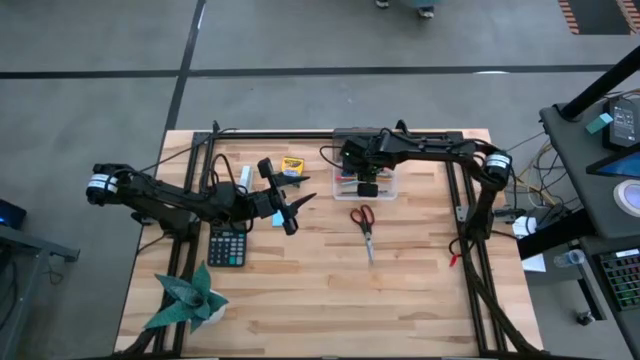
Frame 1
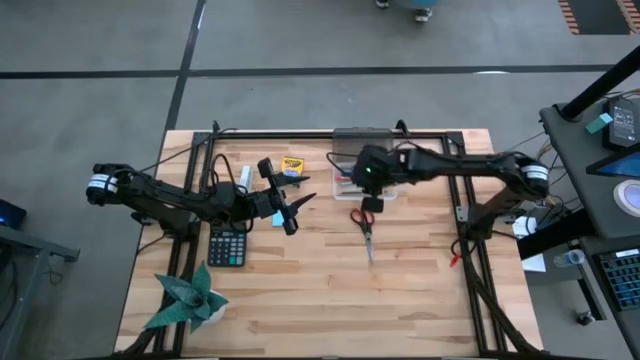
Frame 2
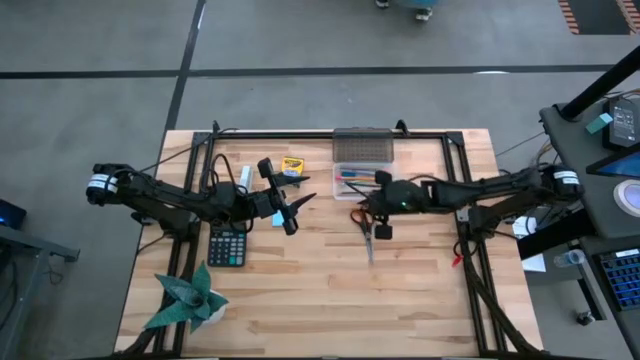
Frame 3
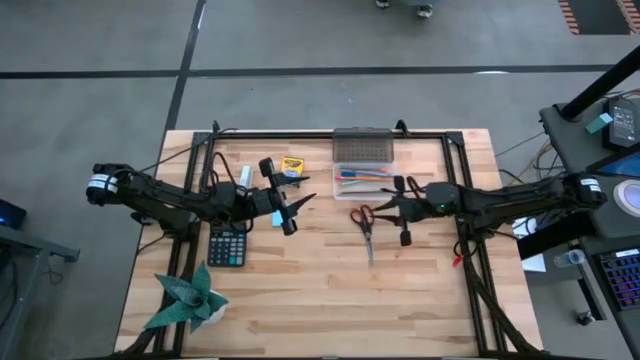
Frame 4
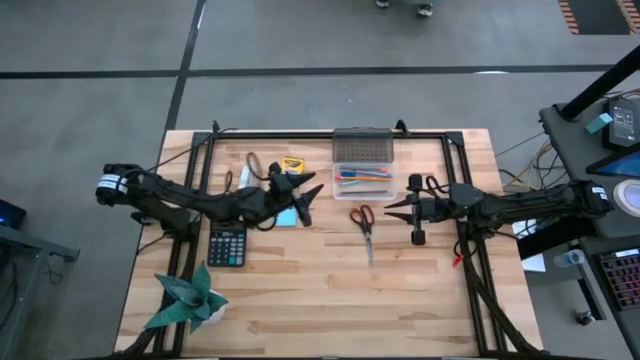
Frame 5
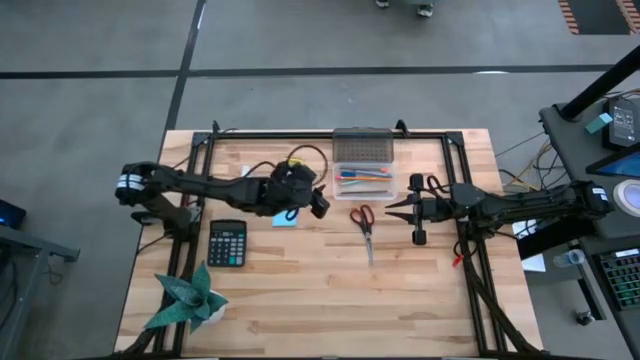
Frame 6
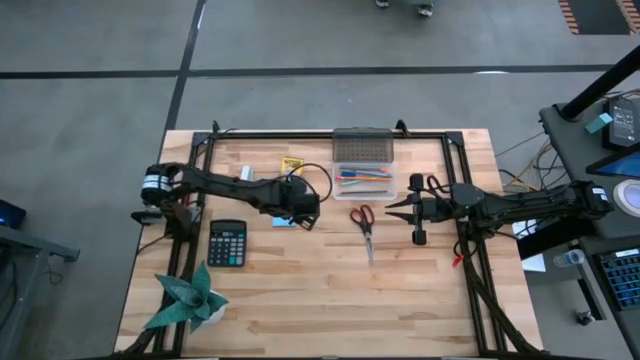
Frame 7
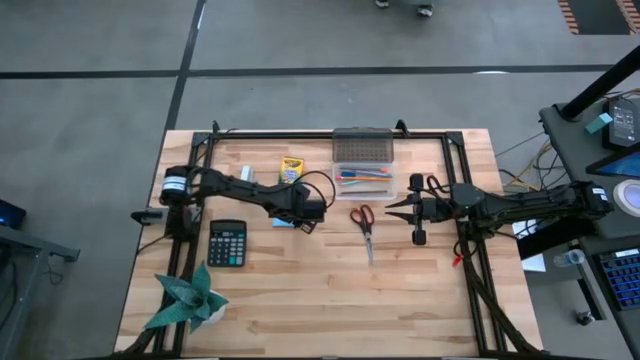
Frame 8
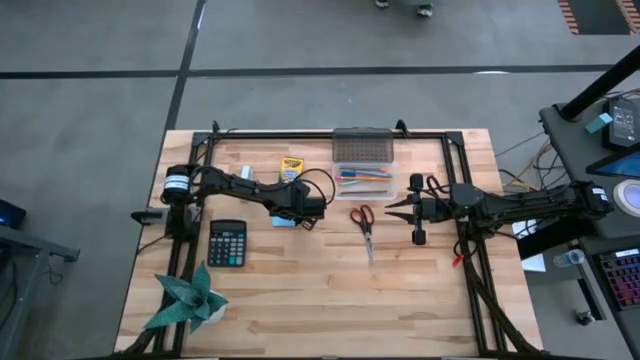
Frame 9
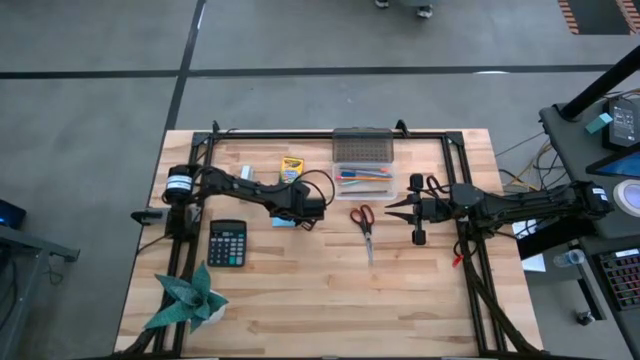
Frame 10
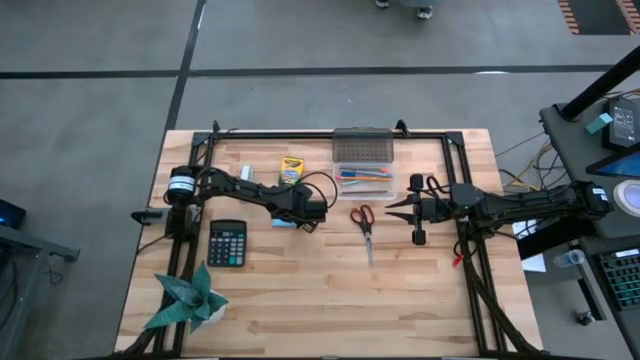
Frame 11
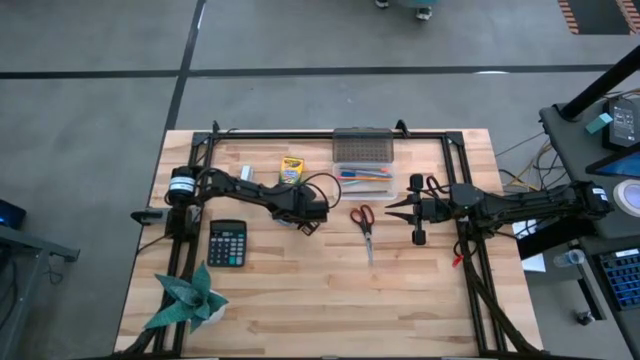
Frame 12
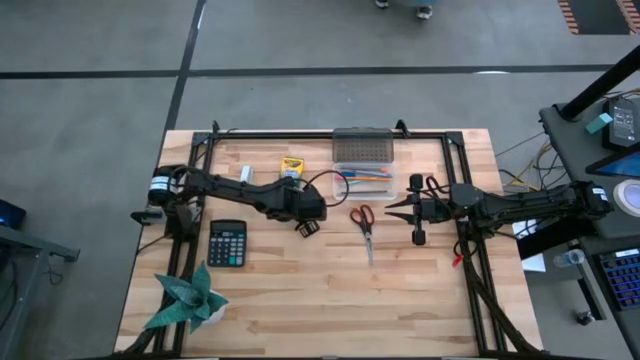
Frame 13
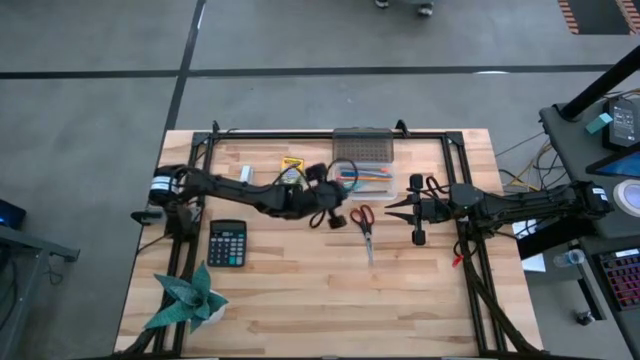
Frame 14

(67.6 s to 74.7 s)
Task: Pack school essentials
Put the blue sticky notes into the transparent supply box

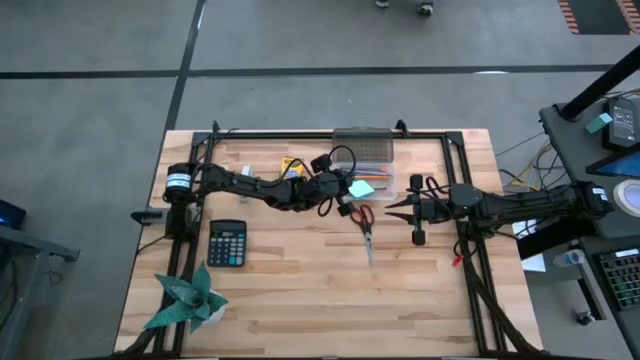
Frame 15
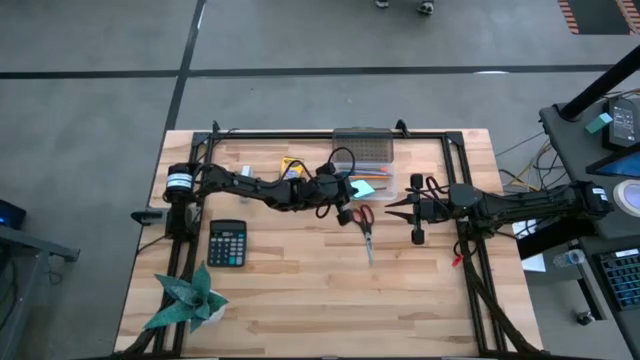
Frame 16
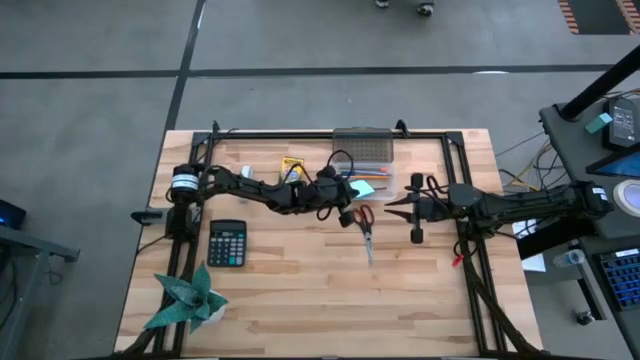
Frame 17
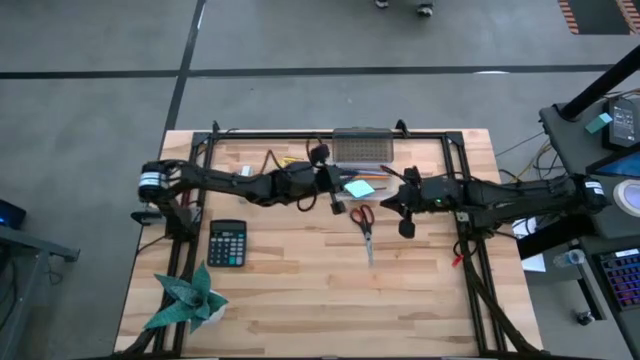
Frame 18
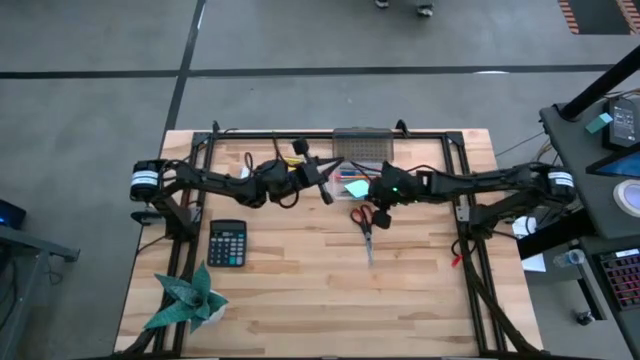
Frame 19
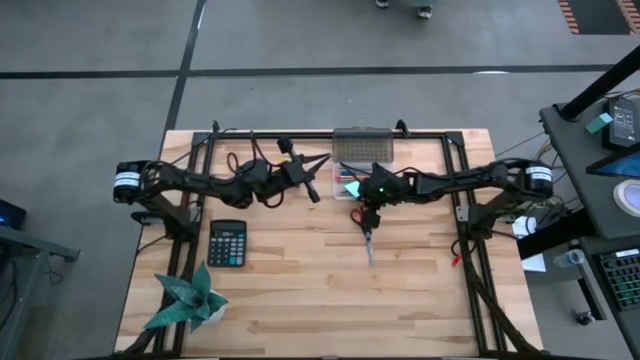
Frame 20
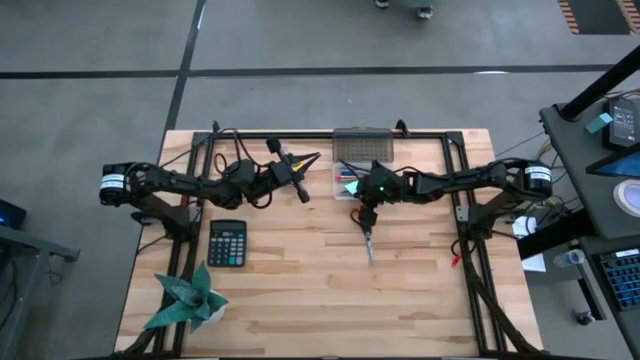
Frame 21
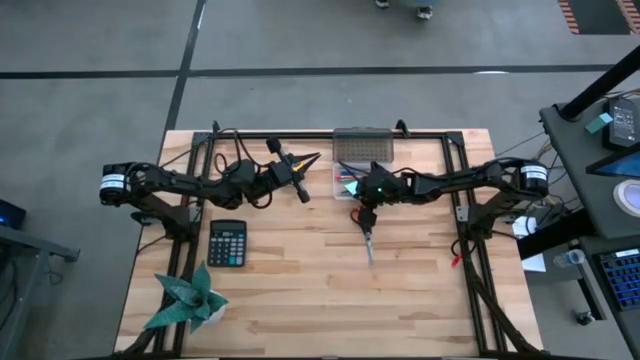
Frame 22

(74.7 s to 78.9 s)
Put the blue sticky notes into the transparent supply box

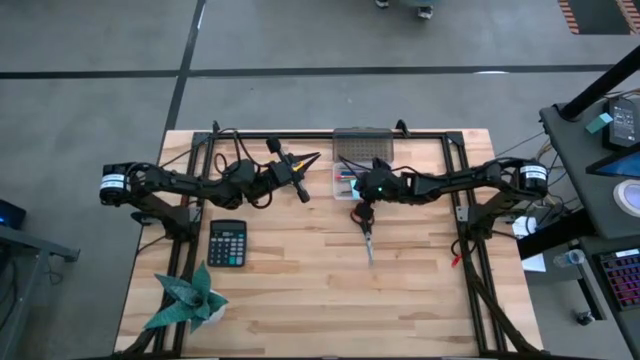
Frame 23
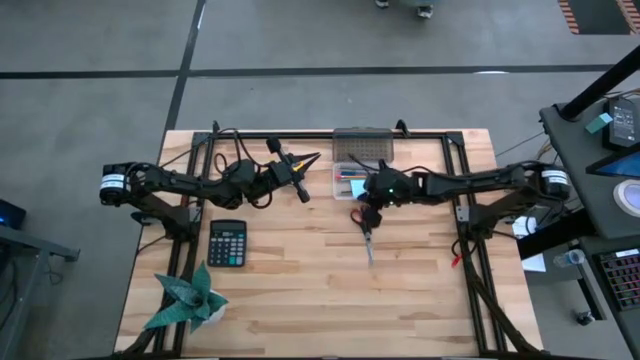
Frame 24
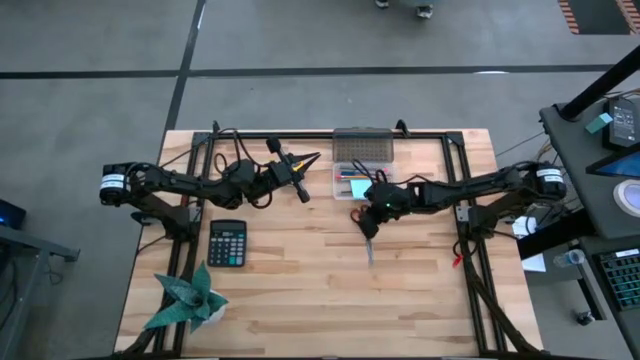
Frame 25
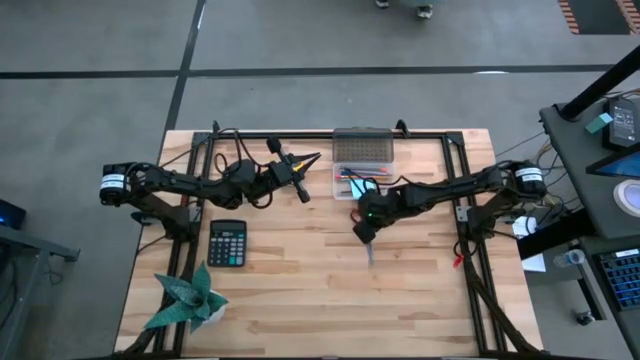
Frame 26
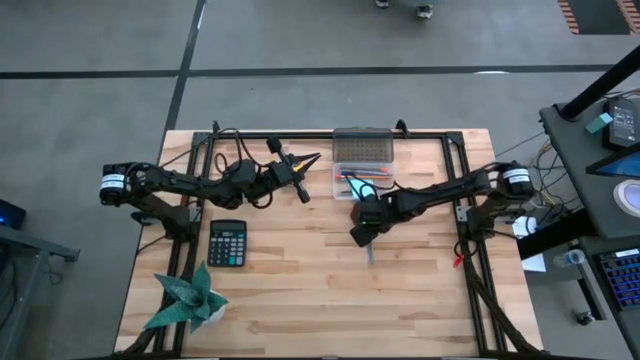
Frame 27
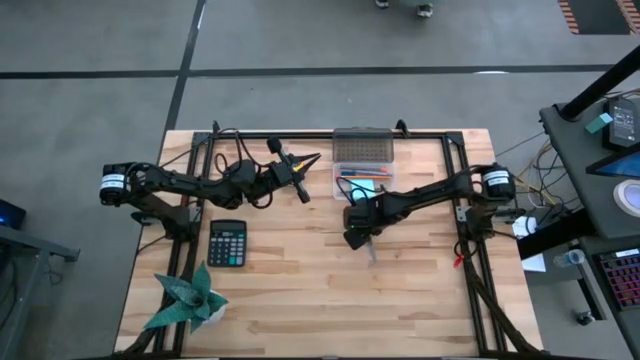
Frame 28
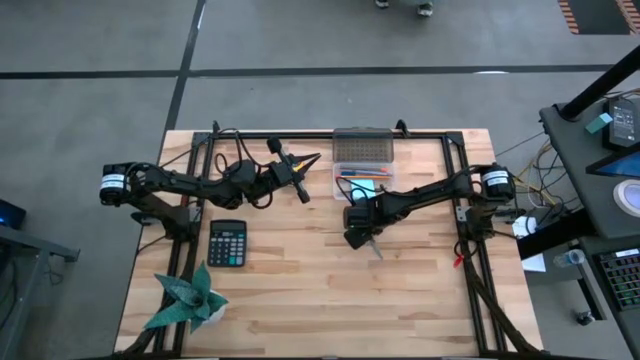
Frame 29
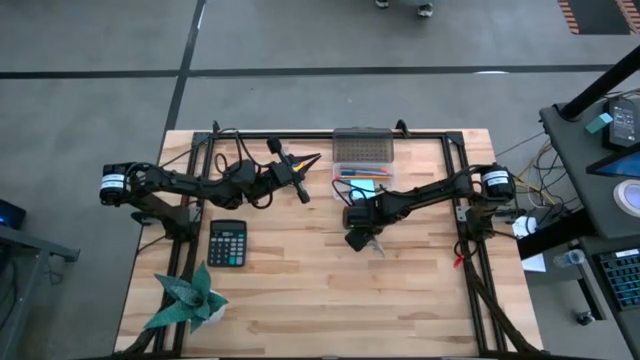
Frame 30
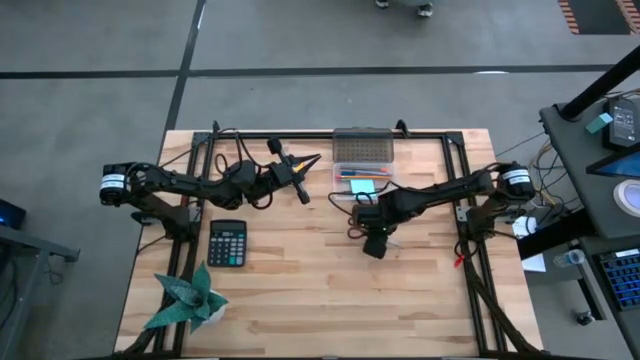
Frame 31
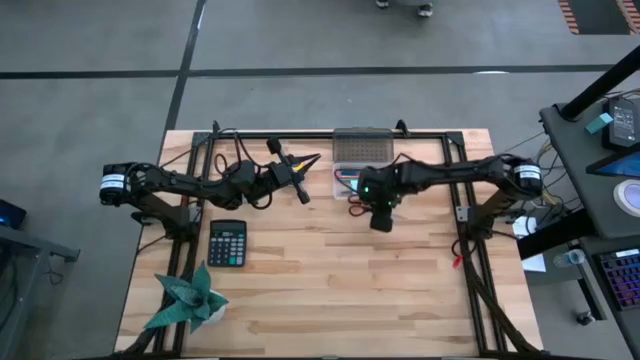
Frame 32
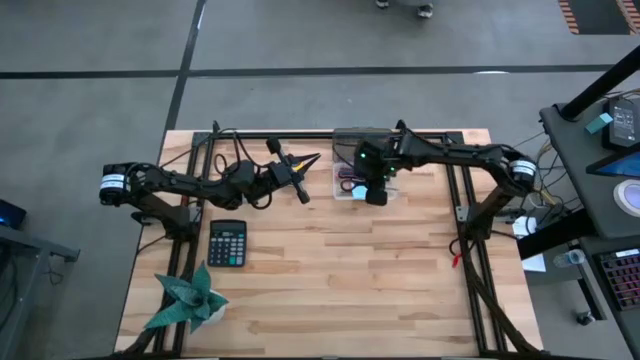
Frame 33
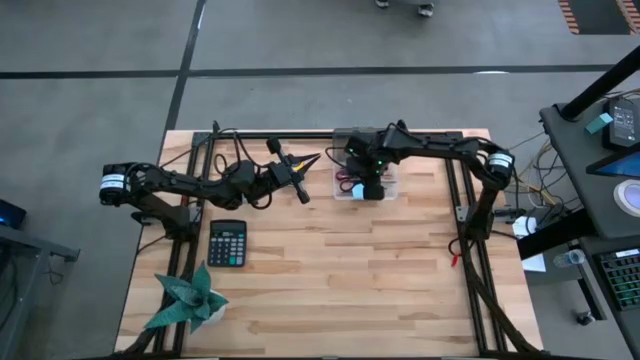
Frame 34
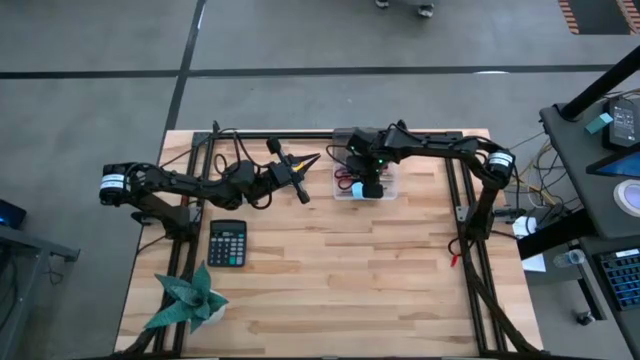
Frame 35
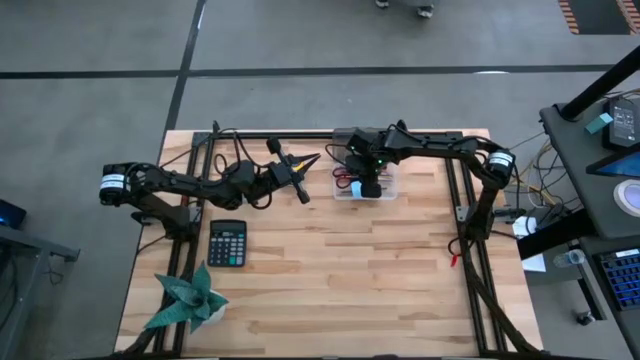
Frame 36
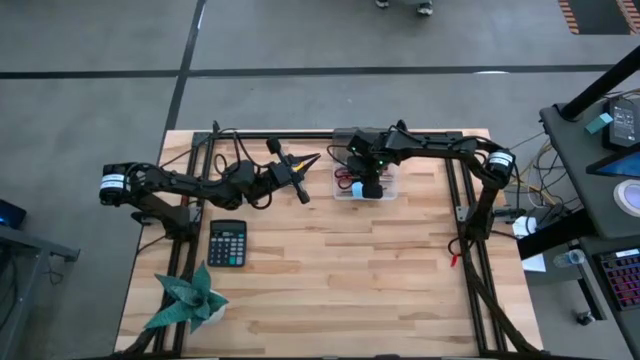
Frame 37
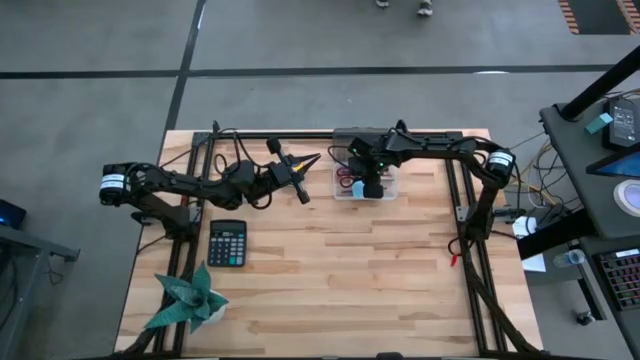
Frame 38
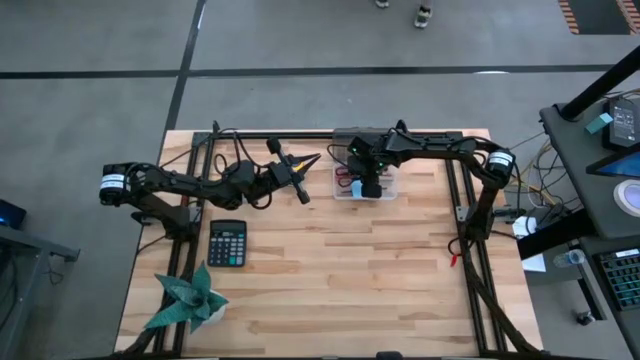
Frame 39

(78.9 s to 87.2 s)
Put the black scissors into the transparent supply box

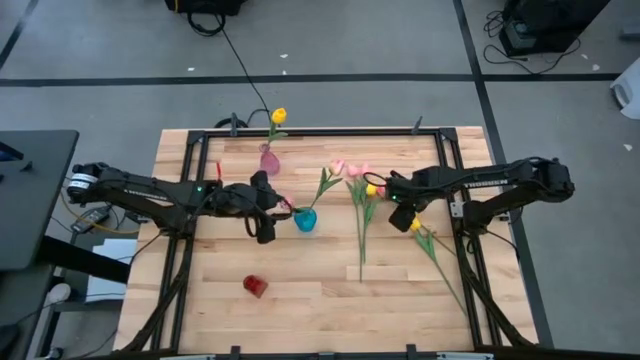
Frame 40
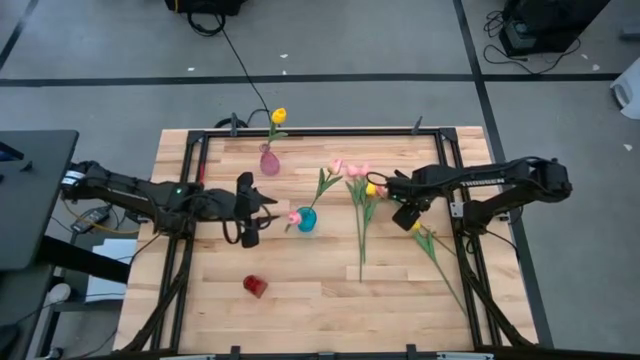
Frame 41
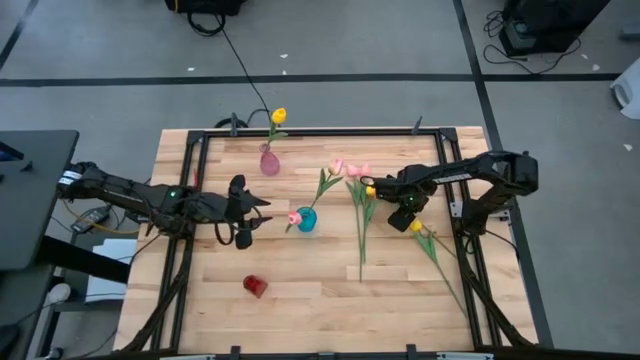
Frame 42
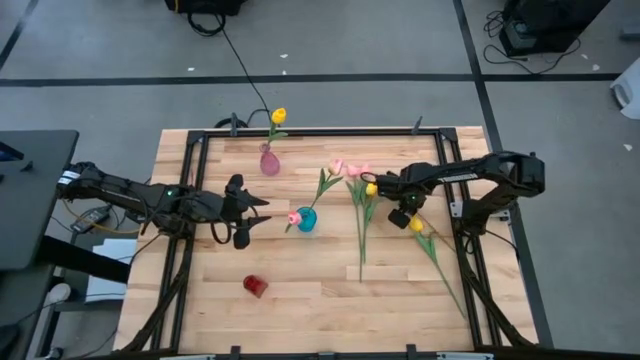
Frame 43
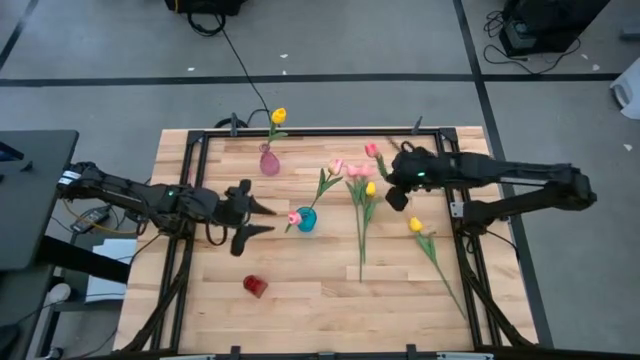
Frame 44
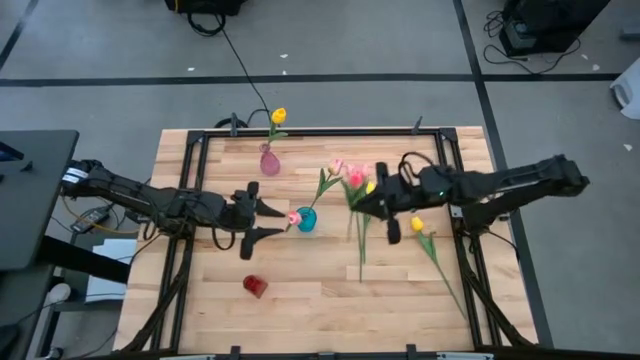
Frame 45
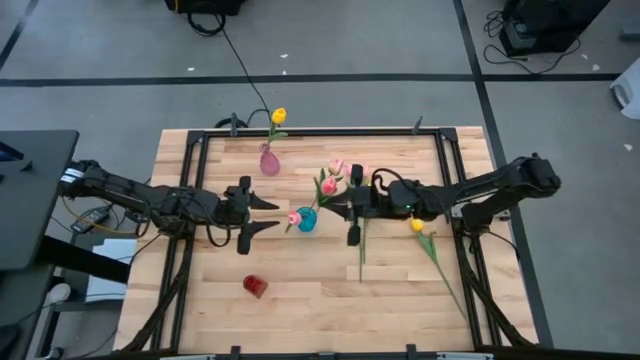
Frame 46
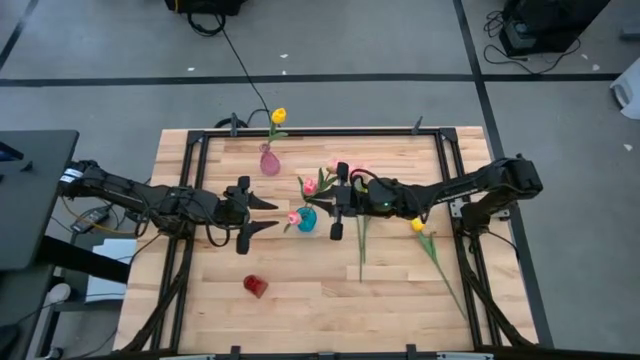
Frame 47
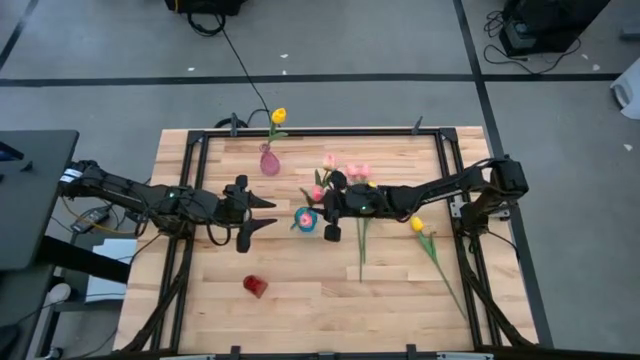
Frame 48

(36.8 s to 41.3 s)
Task: Sort flowers into vase by color
Put the pink flower into the blue flower vase
